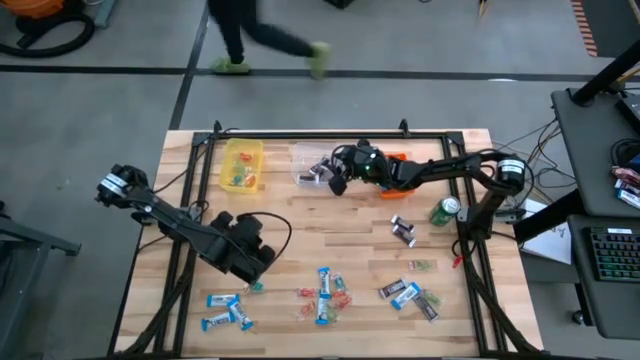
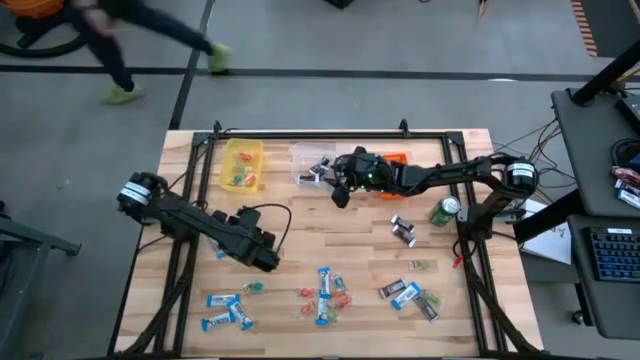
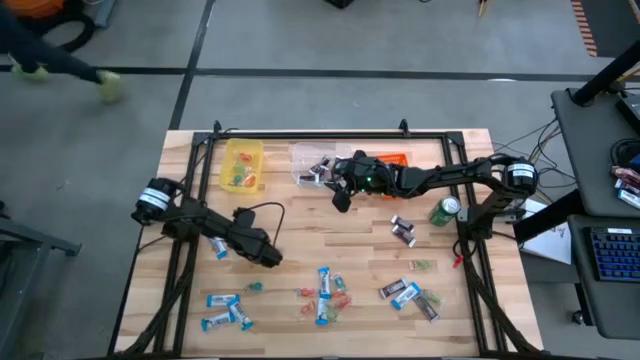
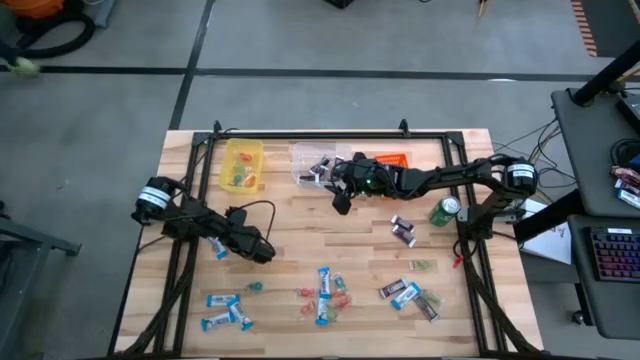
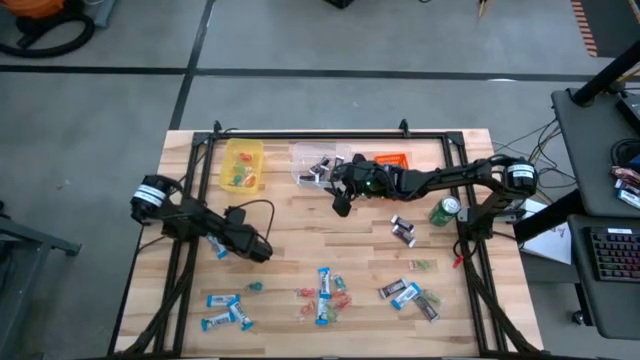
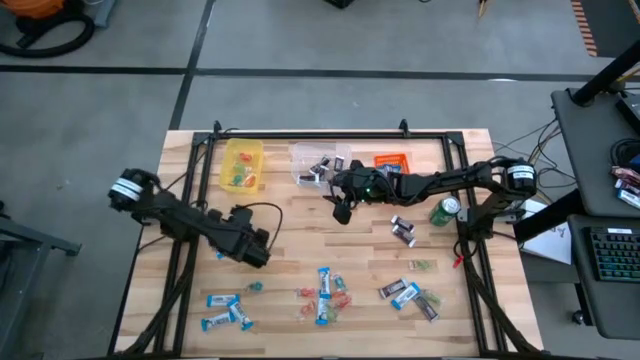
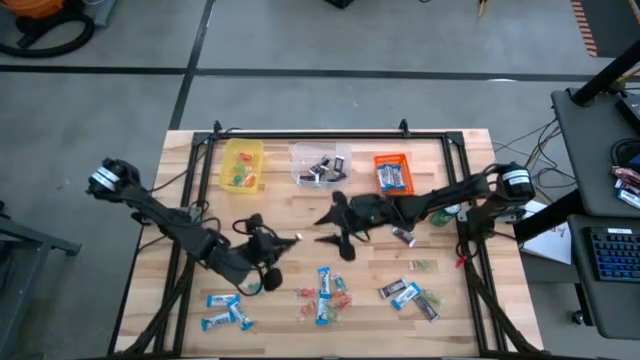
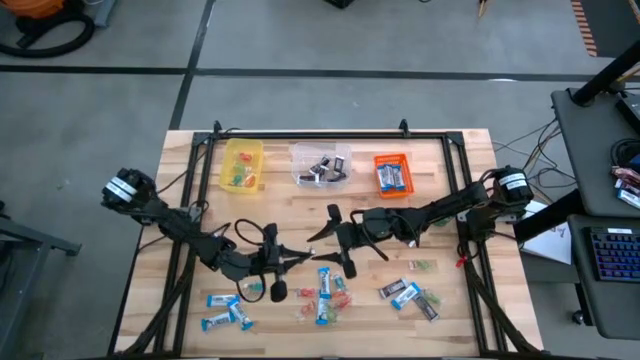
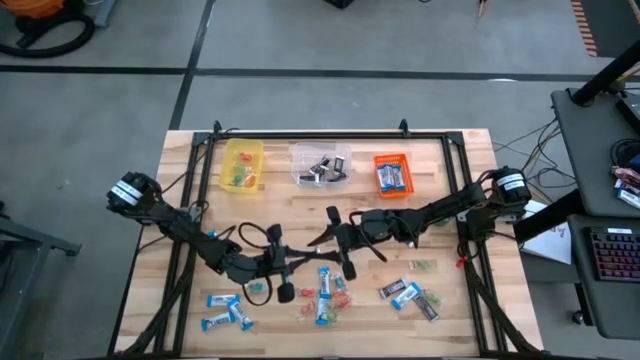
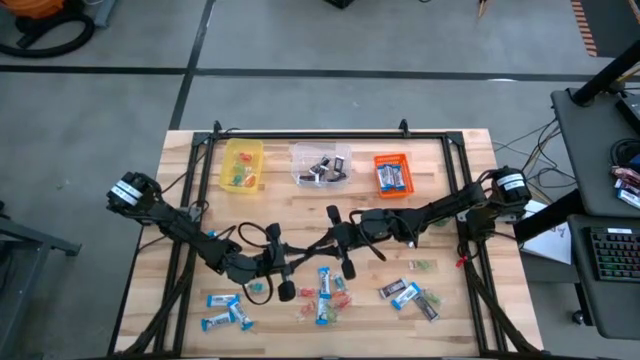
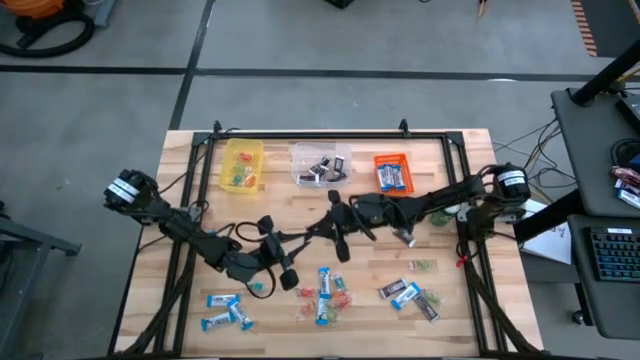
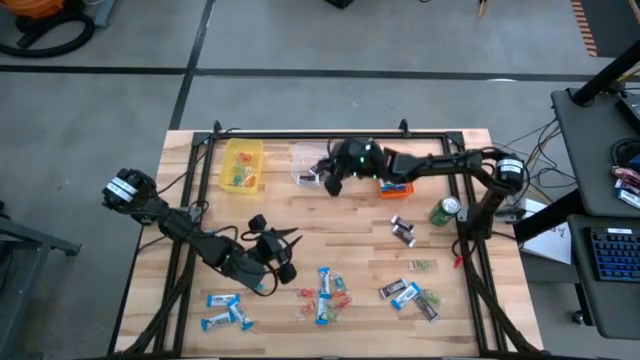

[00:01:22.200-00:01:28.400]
Task: Organize candy in baskets
Put the brown chocolate bar into the transparent bin

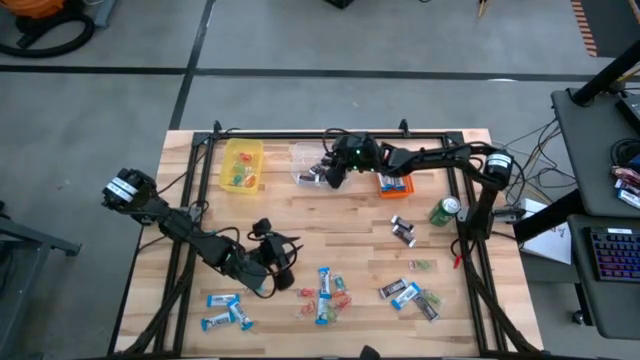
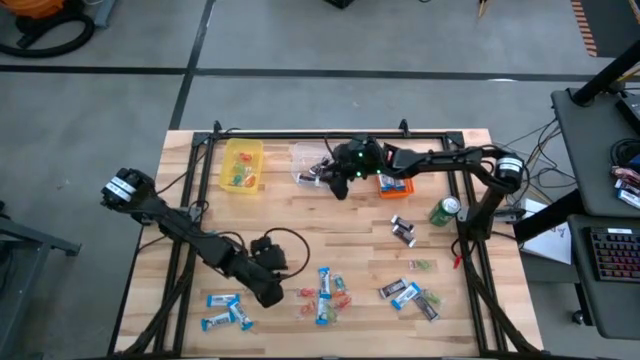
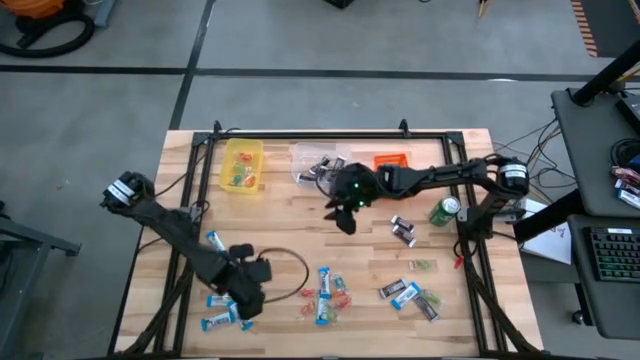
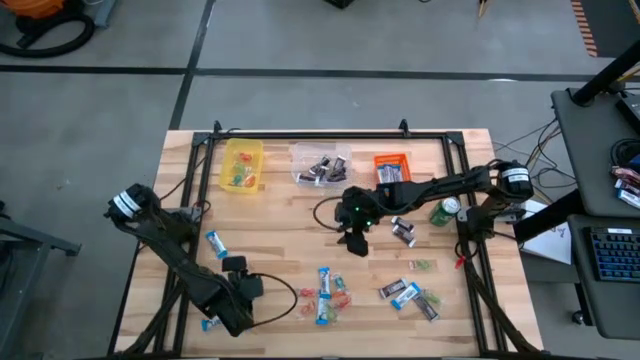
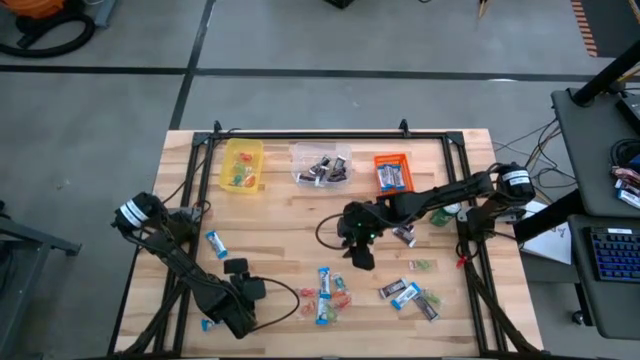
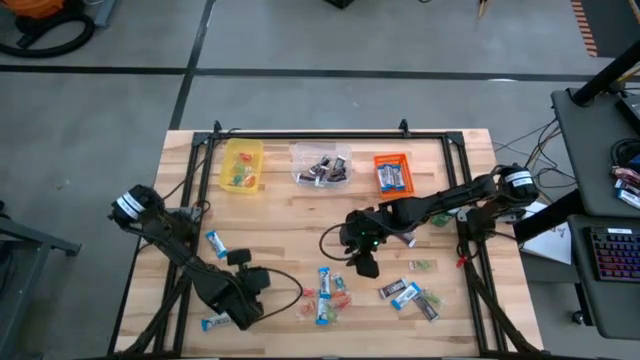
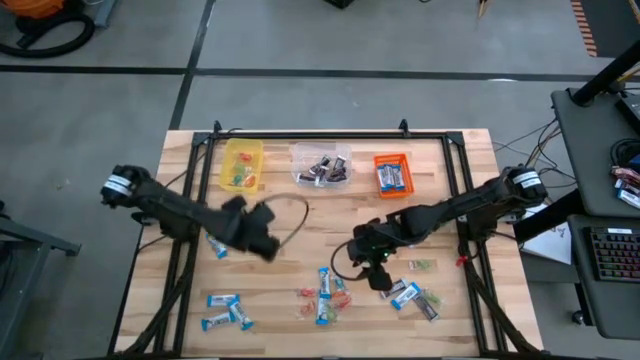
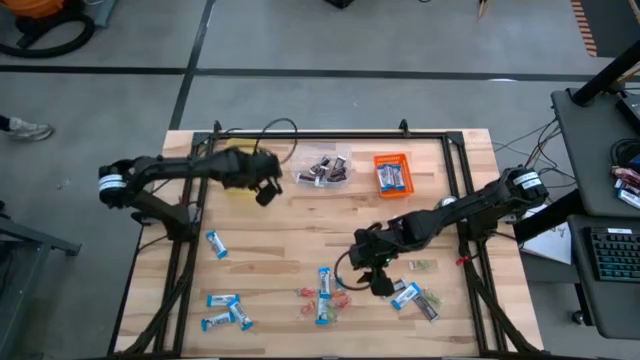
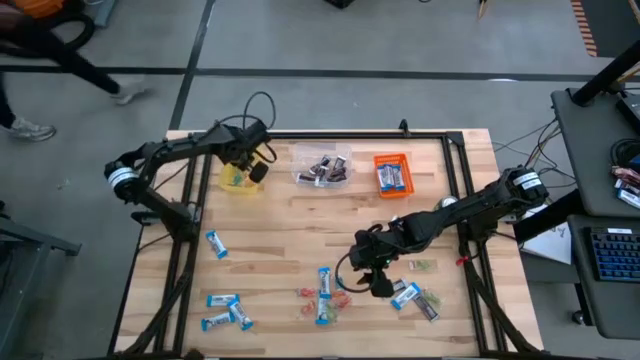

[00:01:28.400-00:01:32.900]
Put the blue gummy into the yellow bin

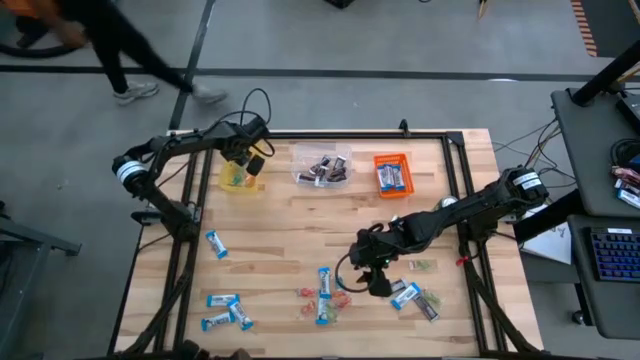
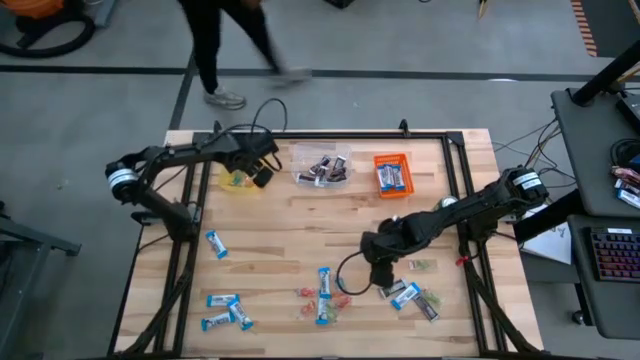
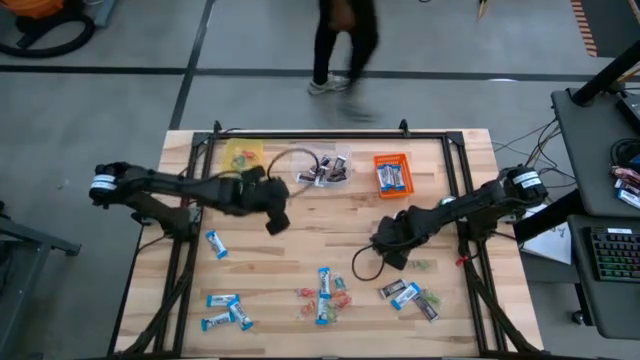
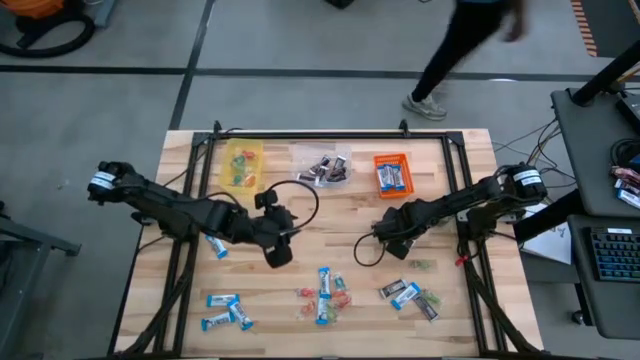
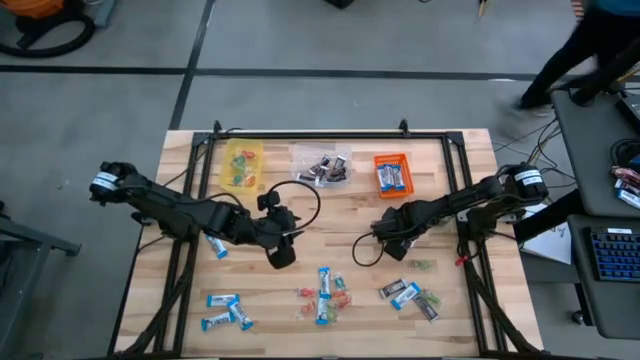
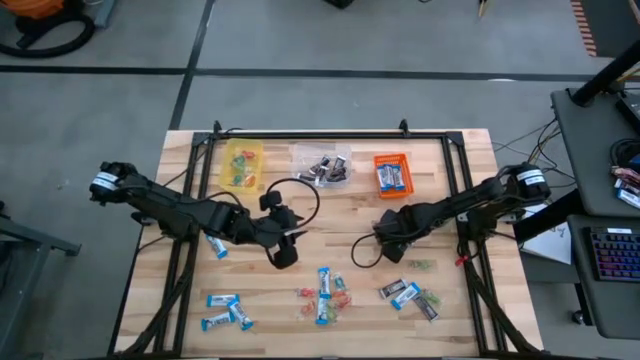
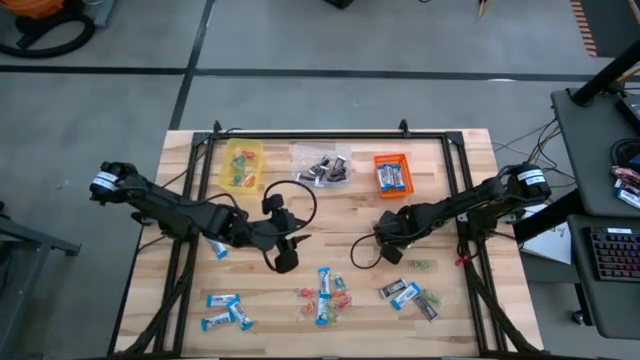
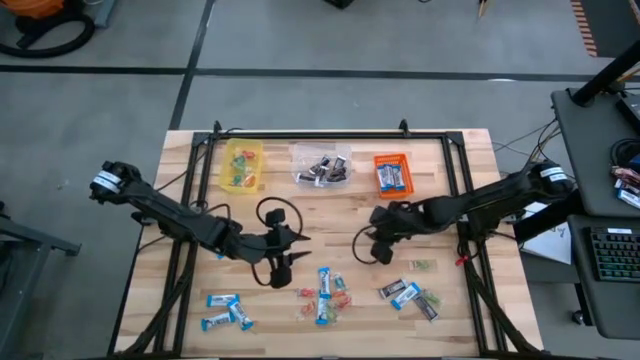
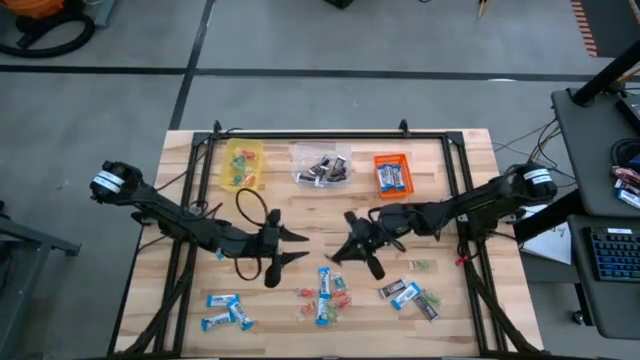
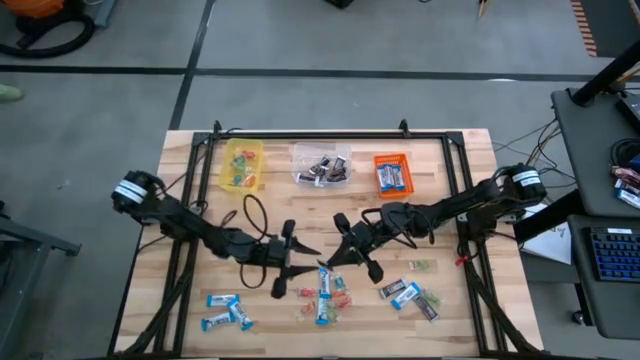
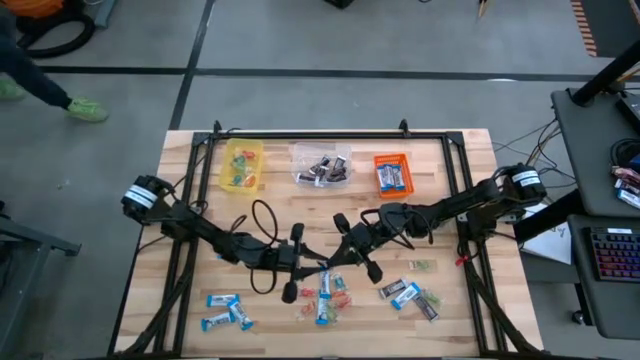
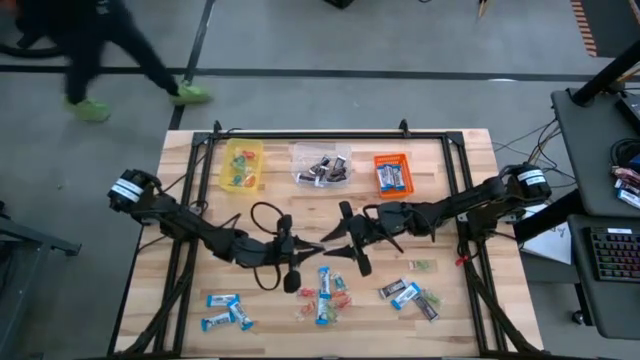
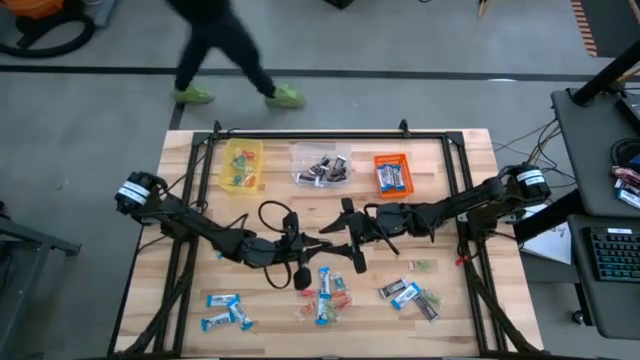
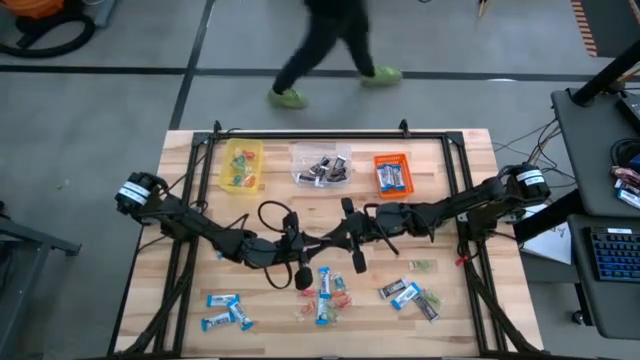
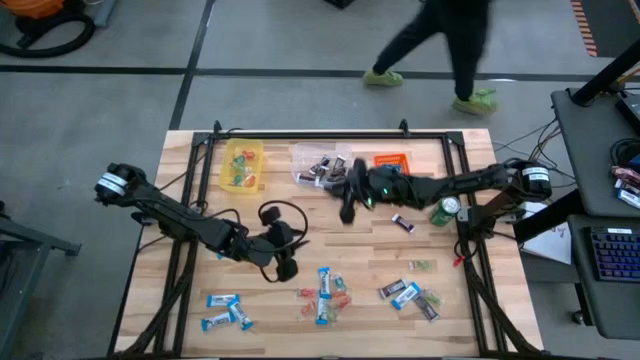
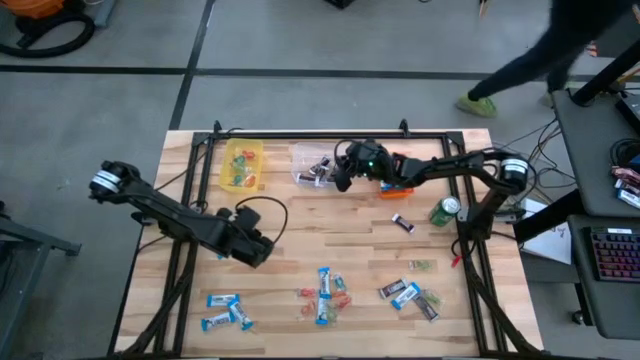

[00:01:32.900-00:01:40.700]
Put the brown chocolate bar into the transparent bin

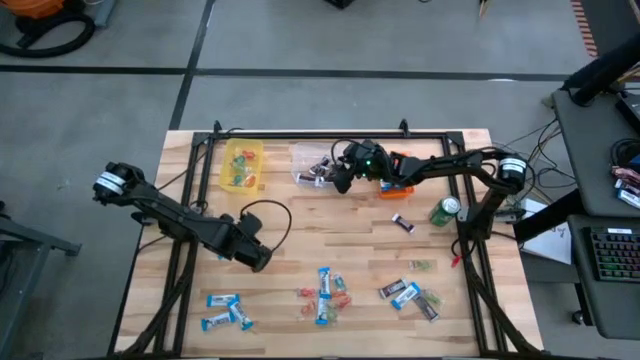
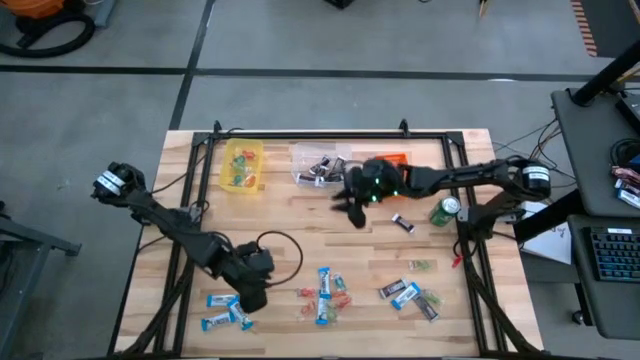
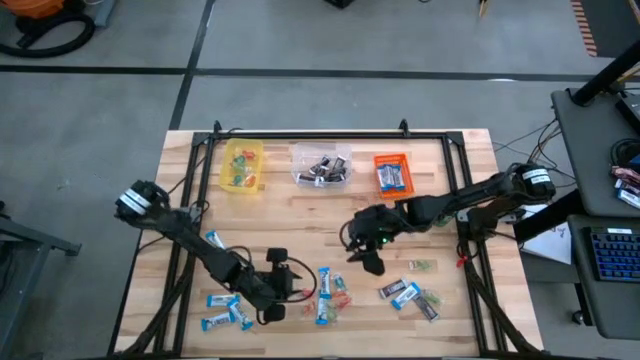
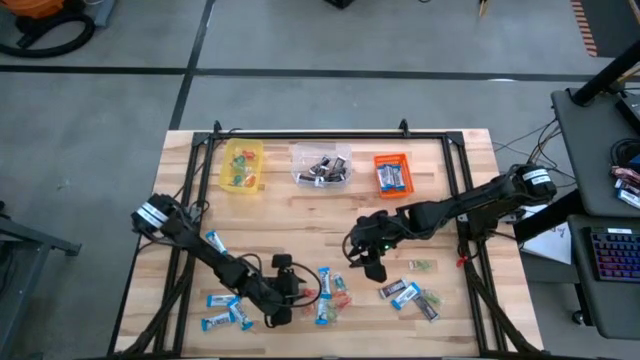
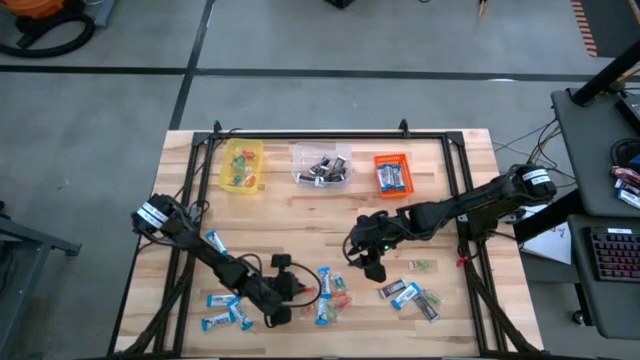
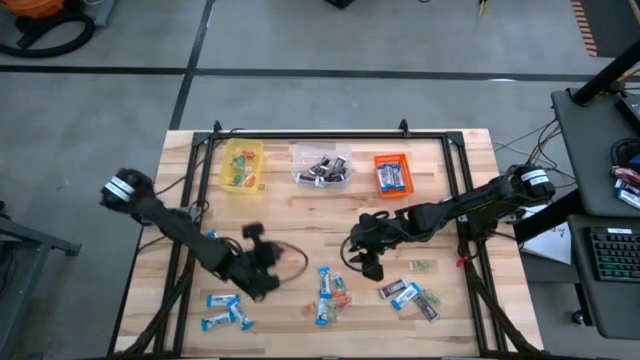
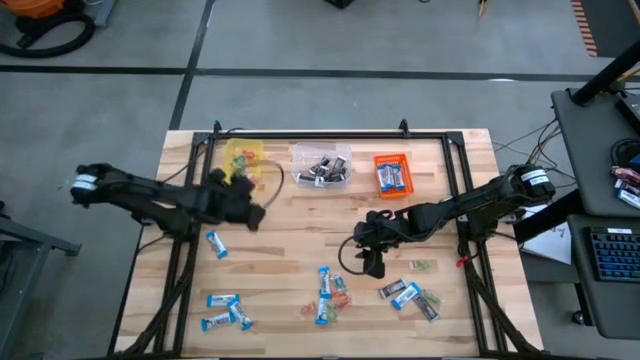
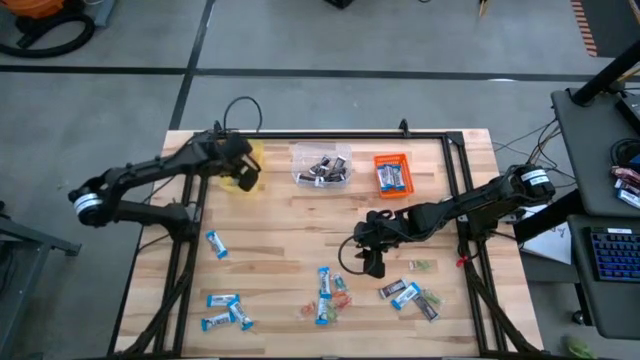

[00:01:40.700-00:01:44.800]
Put the red gummy into the yellow bin
